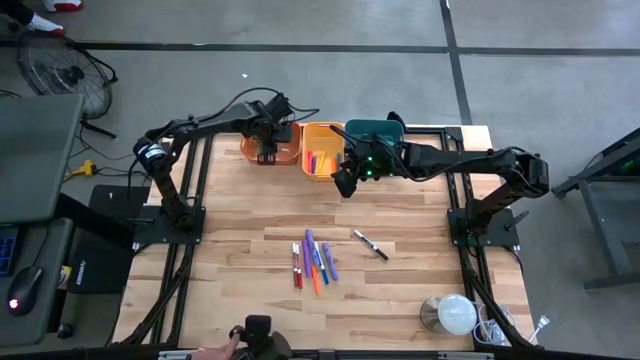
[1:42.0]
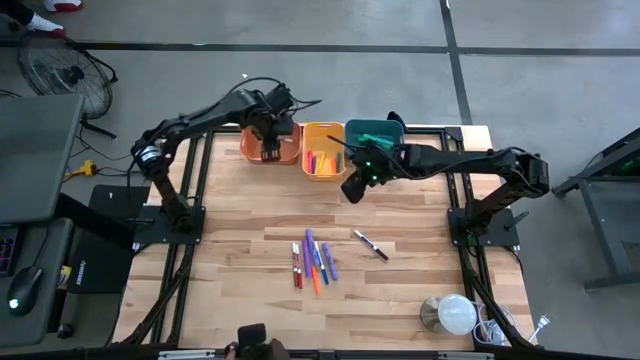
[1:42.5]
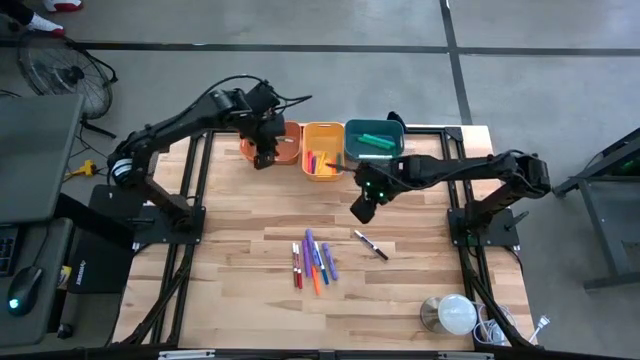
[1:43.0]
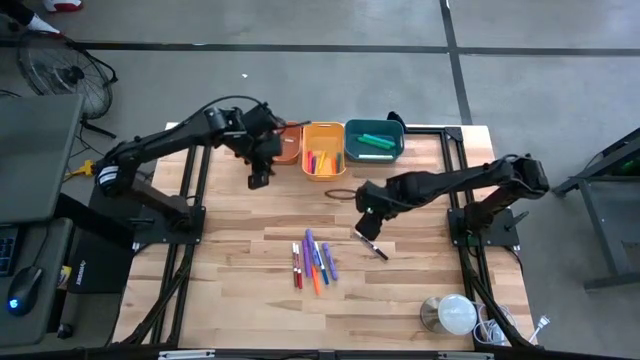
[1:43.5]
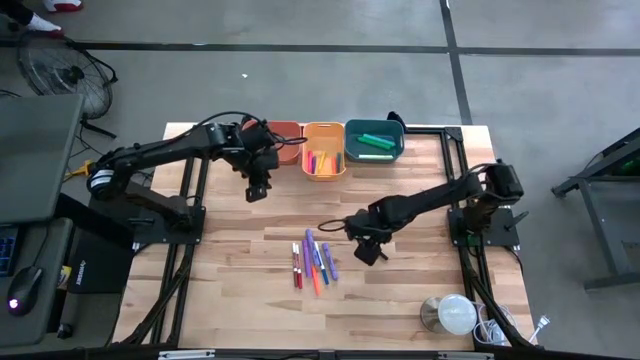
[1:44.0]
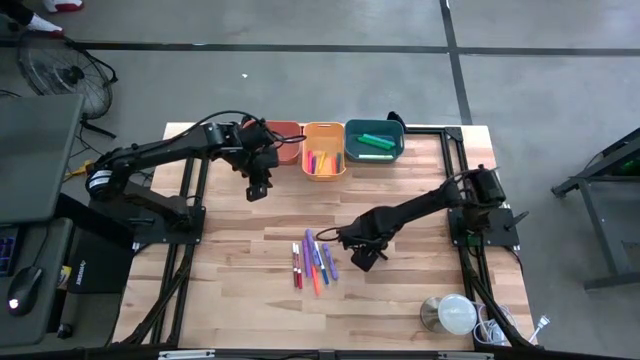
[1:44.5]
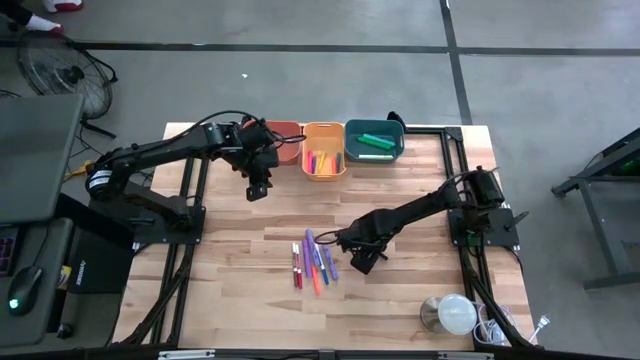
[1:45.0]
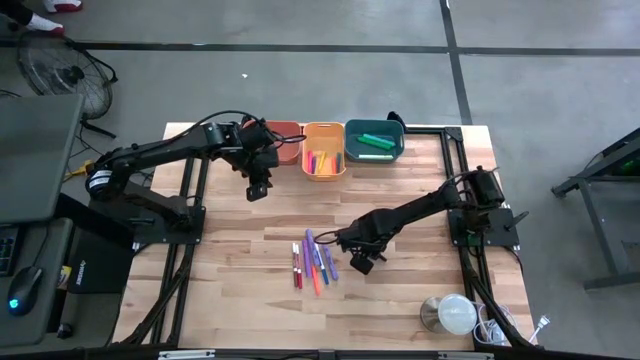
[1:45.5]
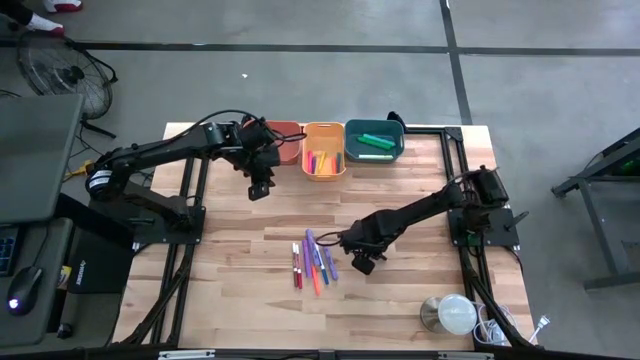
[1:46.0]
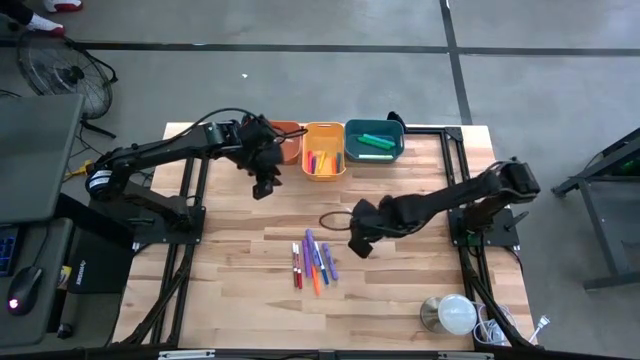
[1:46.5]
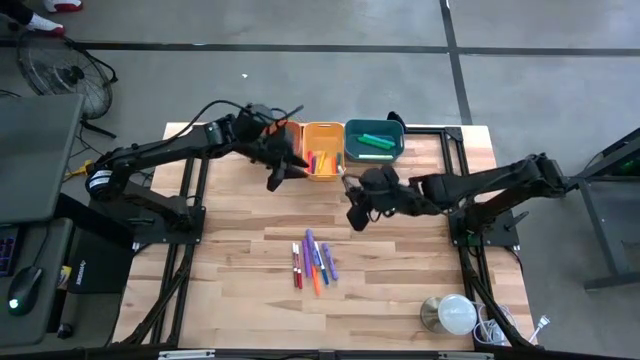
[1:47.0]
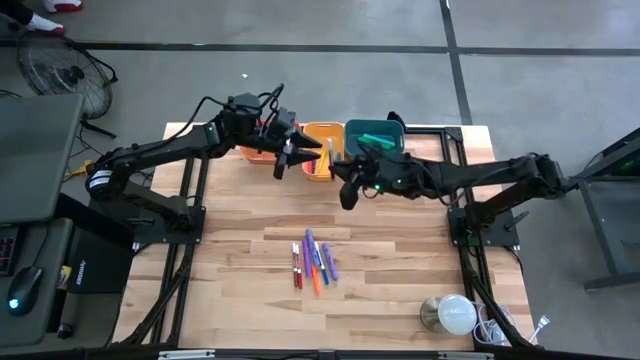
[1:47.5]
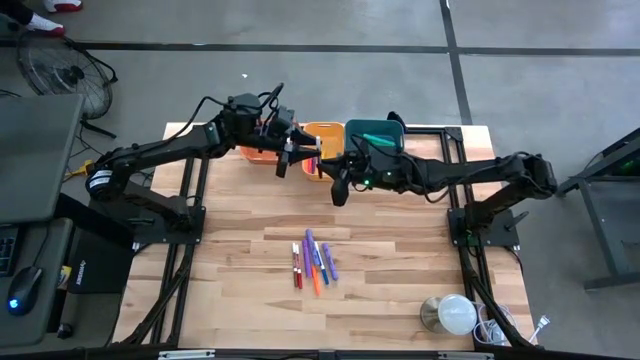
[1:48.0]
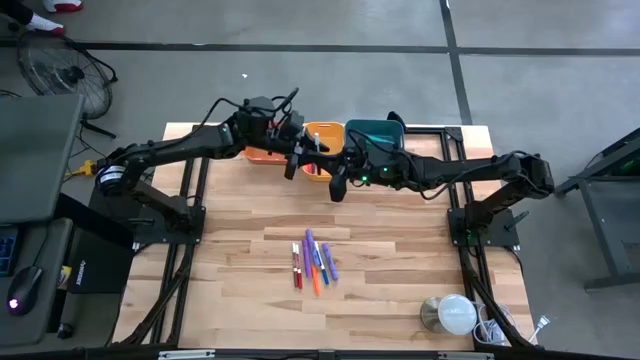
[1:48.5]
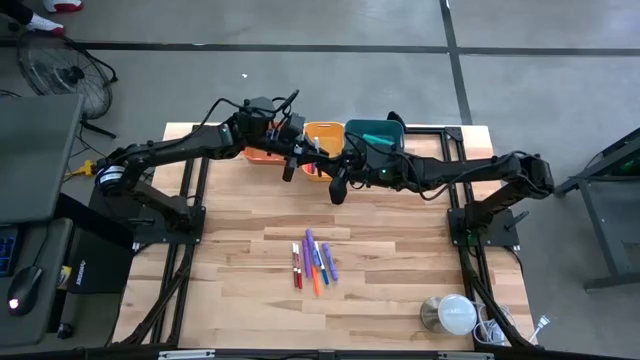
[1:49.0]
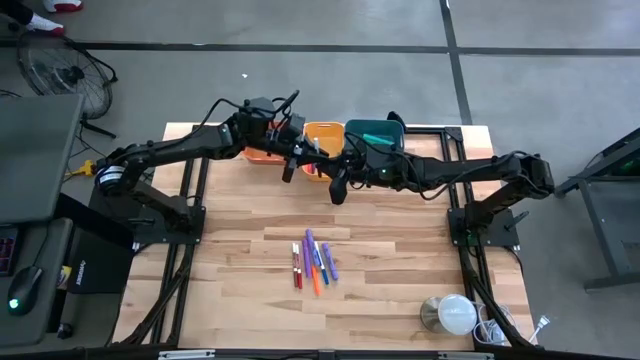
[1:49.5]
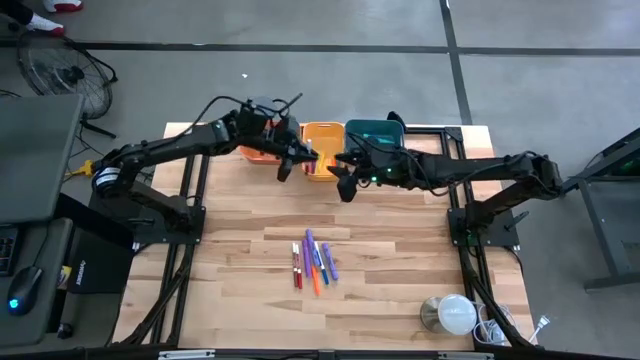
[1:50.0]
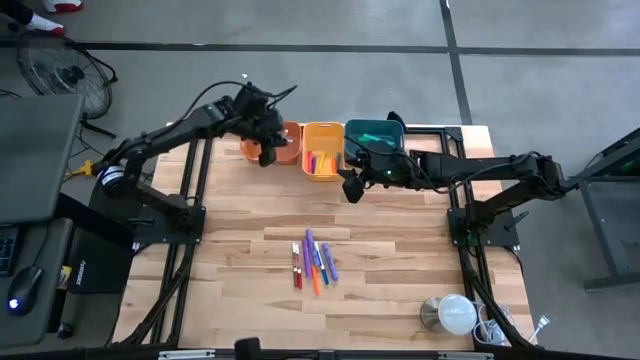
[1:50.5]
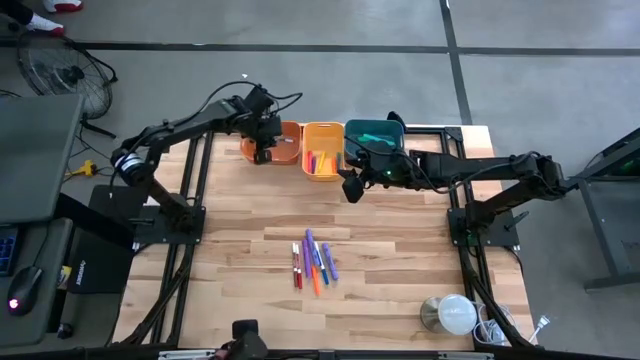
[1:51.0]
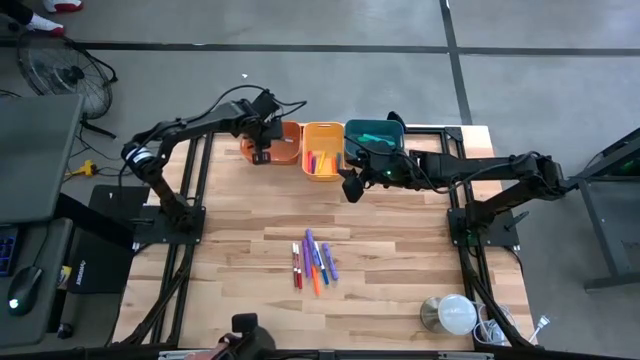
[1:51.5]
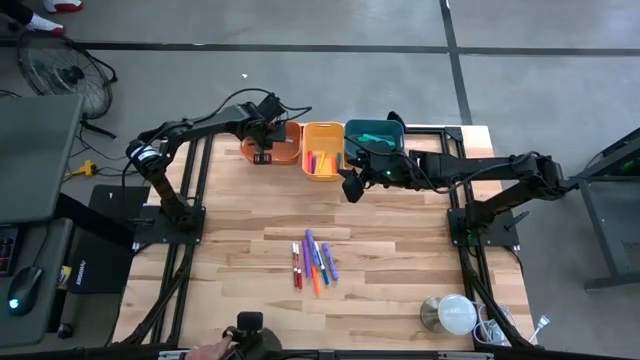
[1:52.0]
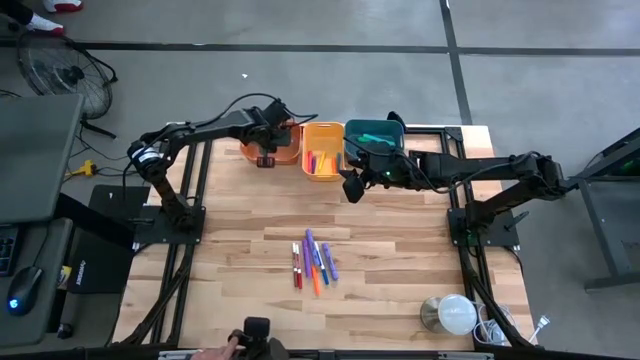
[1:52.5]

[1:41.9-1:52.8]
Task: Pick & Place Markers
Put the black marker into the orange bin

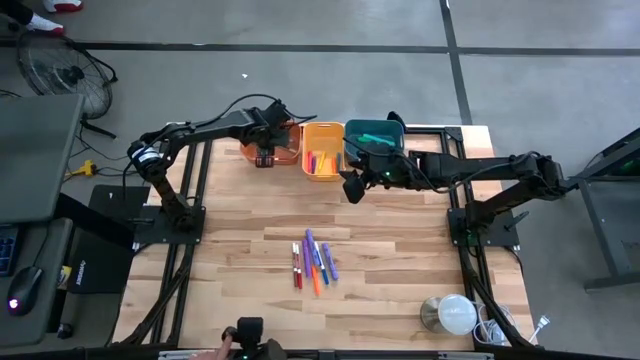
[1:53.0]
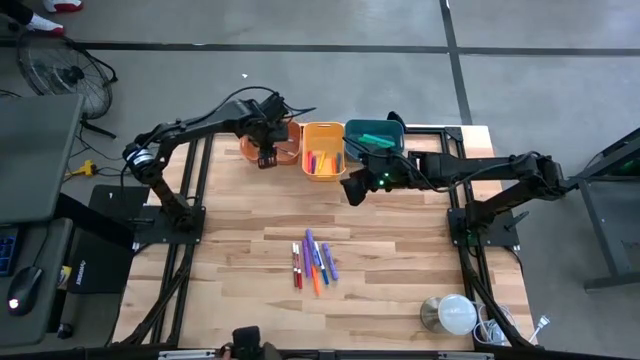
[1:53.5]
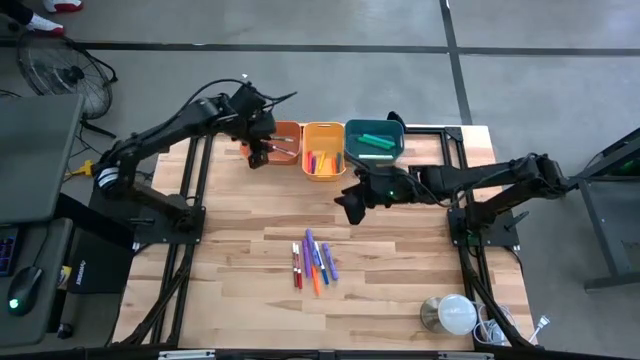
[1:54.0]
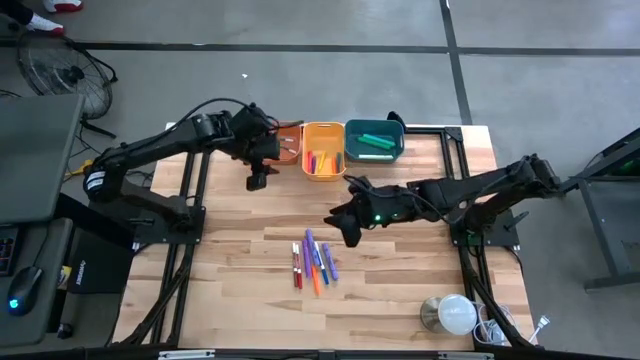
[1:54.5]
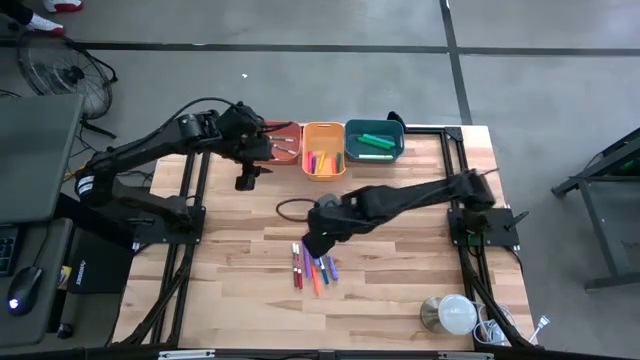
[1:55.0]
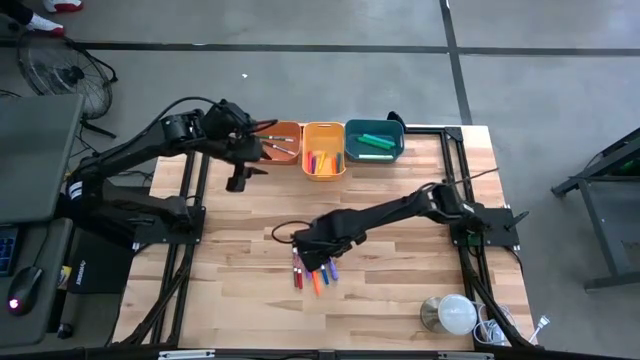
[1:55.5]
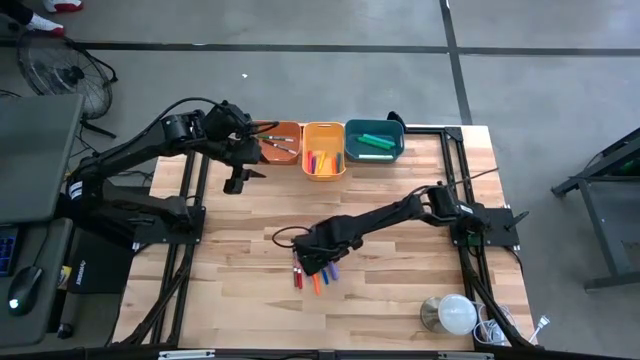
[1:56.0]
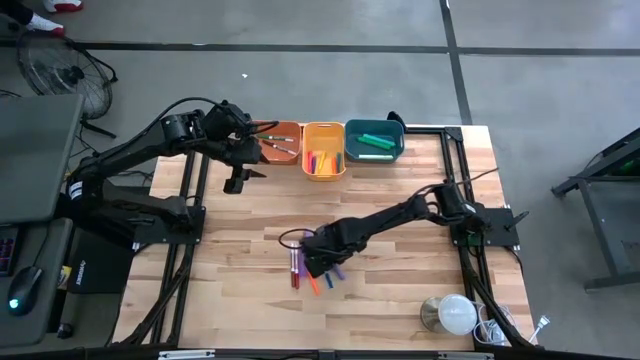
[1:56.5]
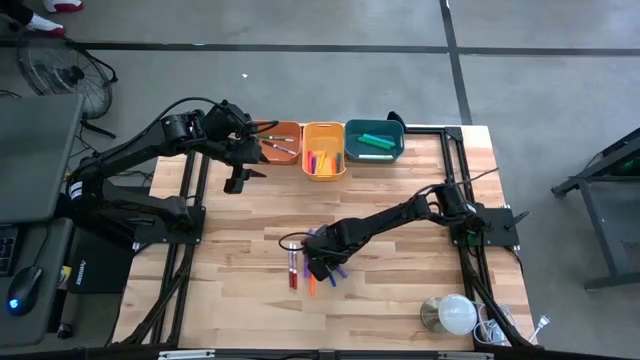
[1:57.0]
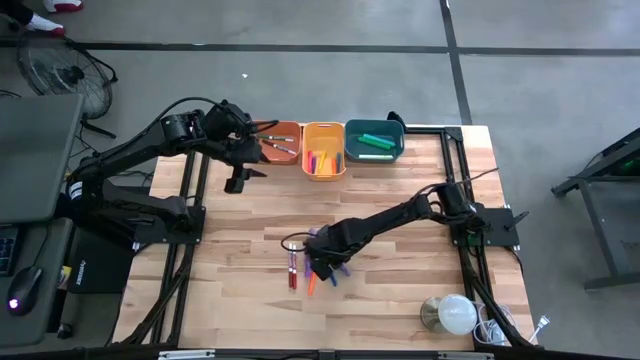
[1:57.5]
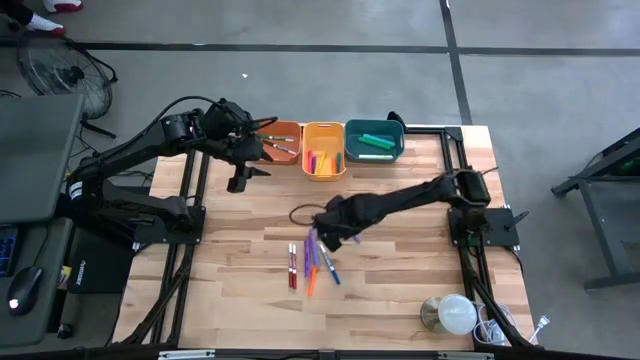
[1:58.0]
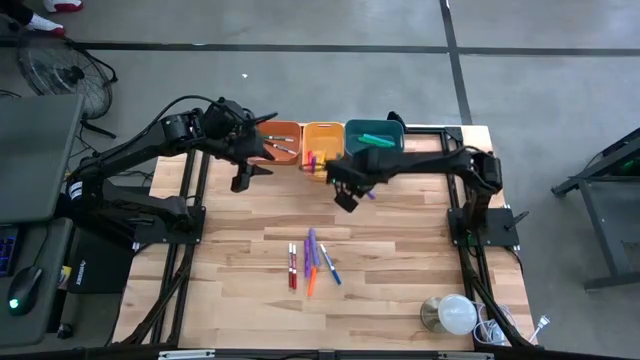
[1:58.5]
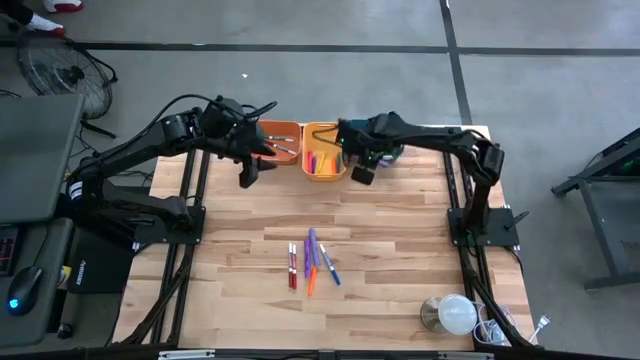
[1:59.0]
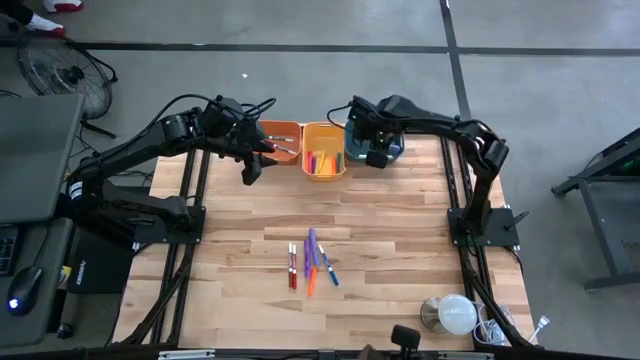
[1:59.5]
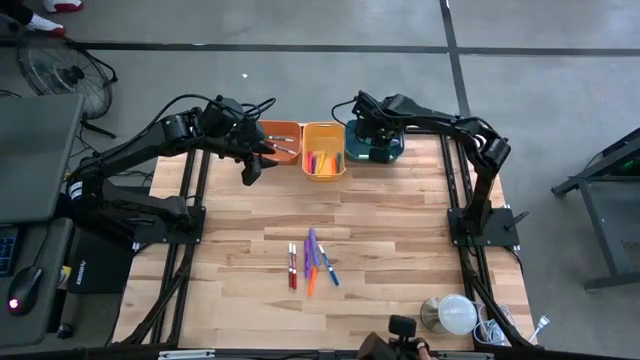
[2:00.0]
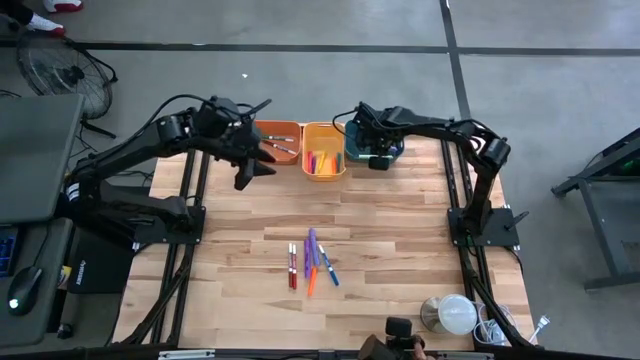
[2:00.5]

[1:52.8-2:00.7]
Put the right purple highlighter into the blue bin

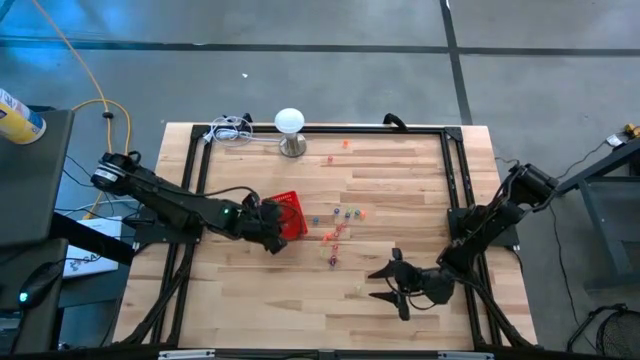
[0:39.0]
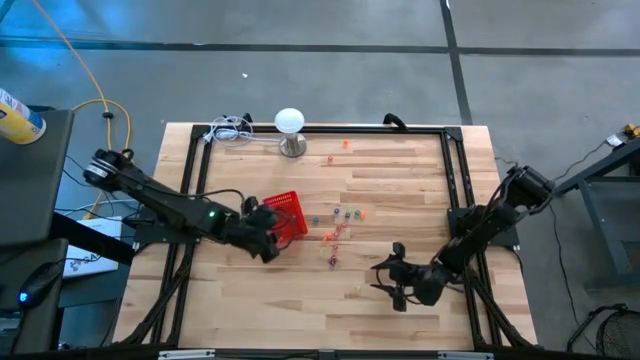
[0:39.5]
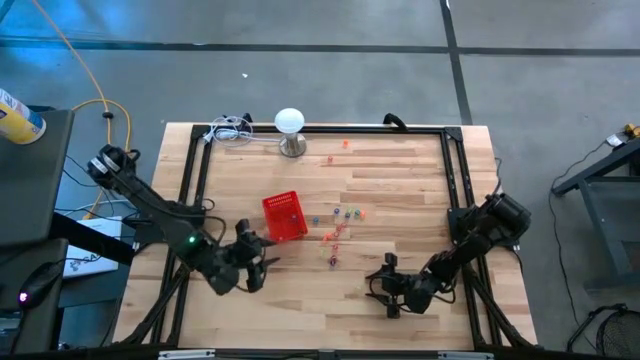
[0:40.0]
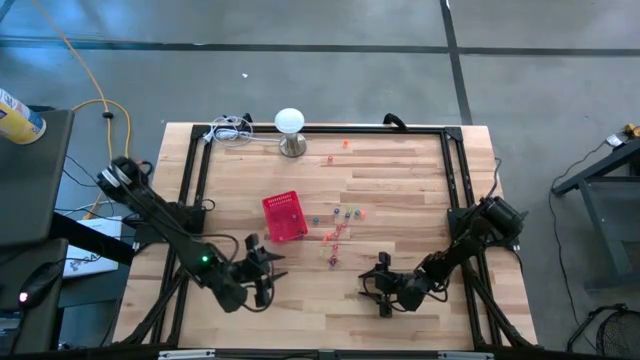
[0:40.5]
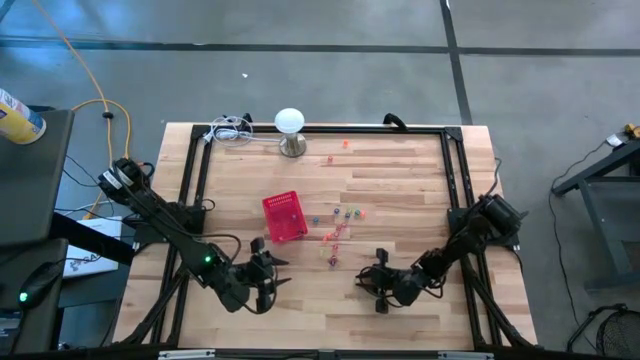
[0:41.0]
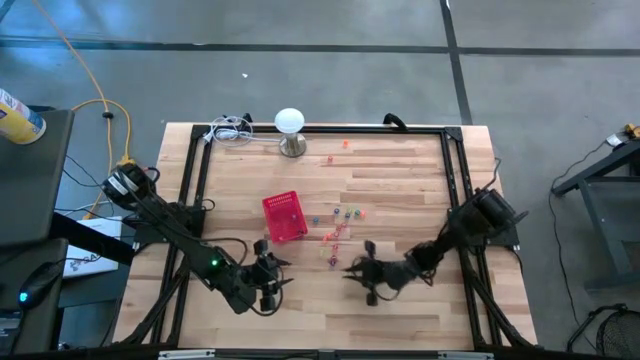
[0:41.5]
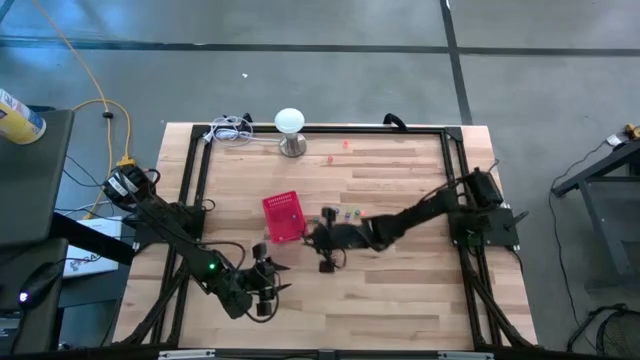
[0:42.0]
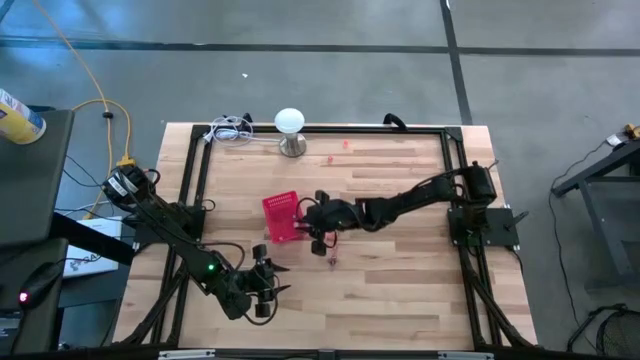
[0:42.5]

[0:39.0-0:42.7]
Task: Pick & Place Dice
Put the yellow die into the red basket
